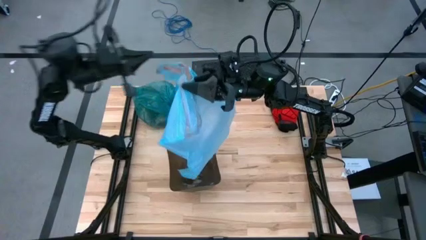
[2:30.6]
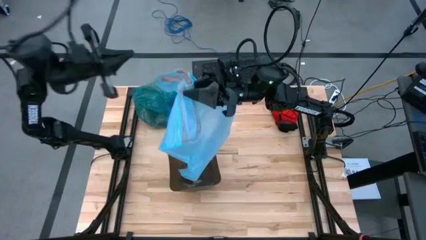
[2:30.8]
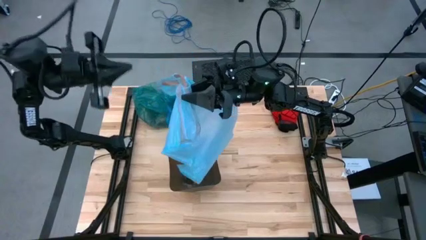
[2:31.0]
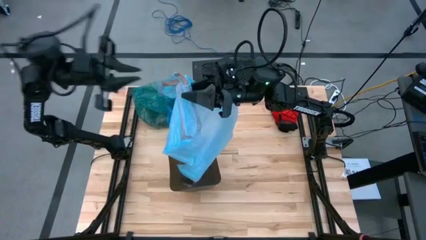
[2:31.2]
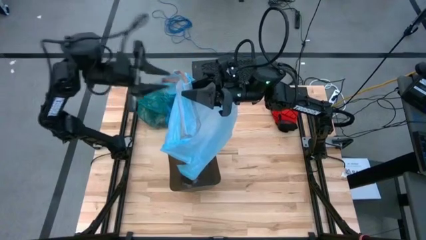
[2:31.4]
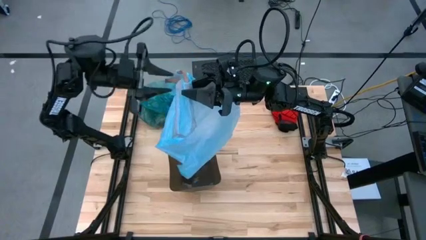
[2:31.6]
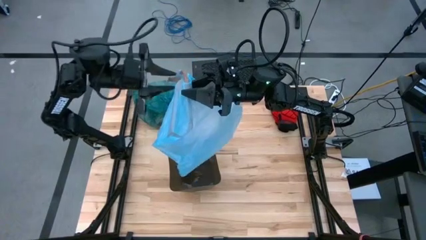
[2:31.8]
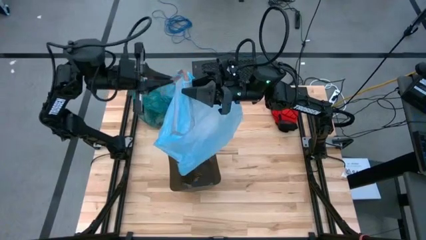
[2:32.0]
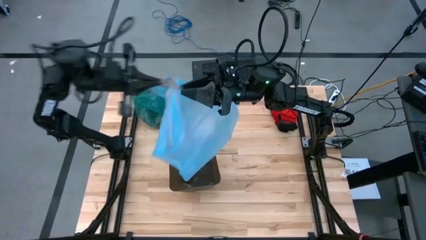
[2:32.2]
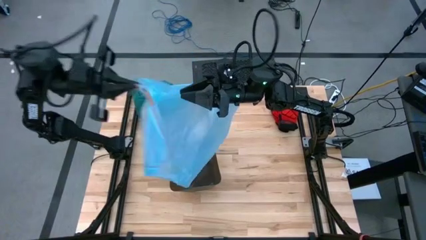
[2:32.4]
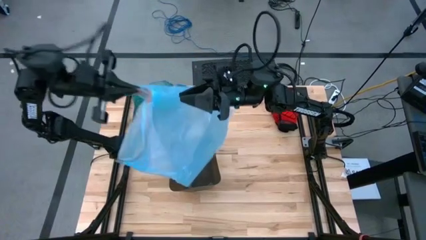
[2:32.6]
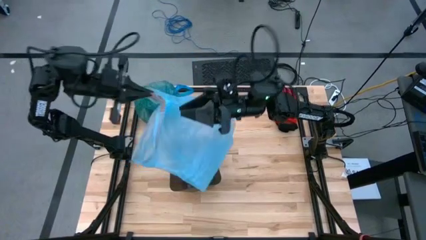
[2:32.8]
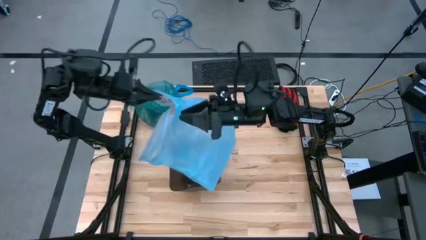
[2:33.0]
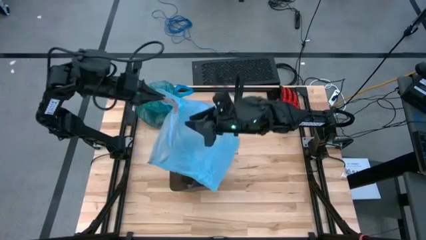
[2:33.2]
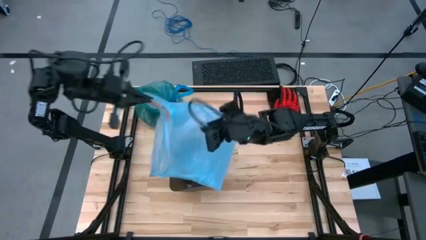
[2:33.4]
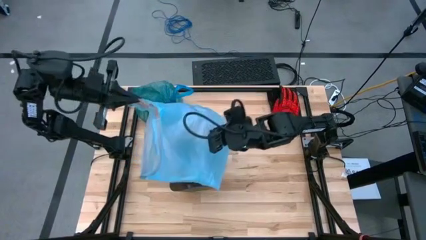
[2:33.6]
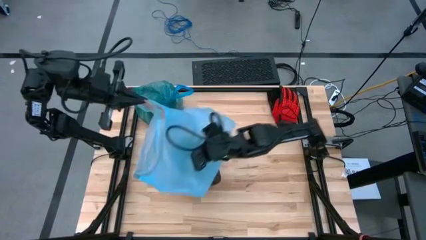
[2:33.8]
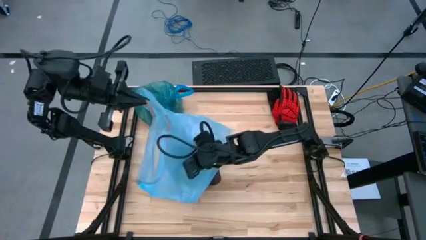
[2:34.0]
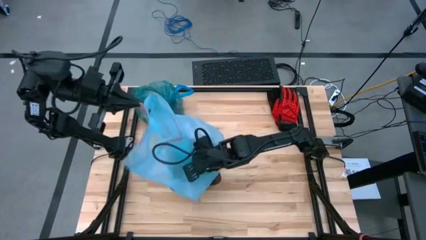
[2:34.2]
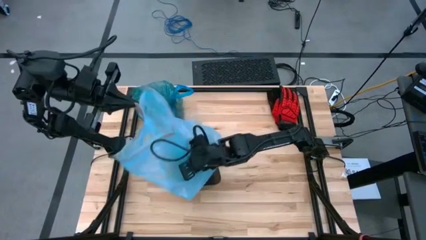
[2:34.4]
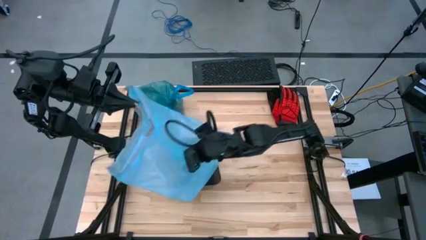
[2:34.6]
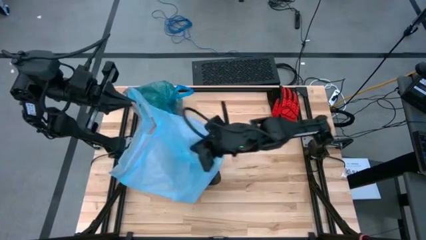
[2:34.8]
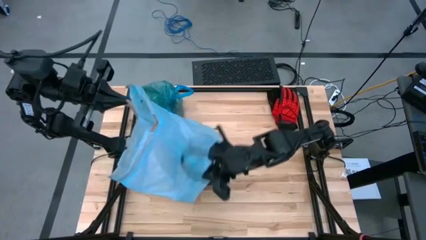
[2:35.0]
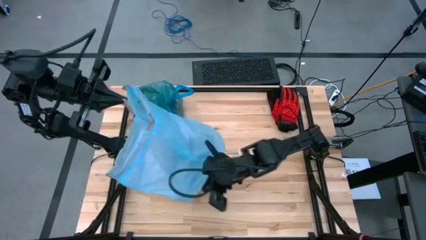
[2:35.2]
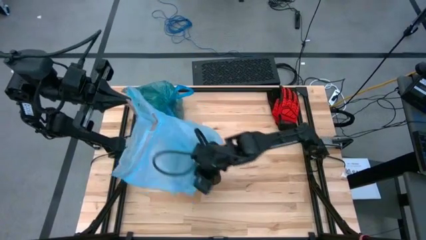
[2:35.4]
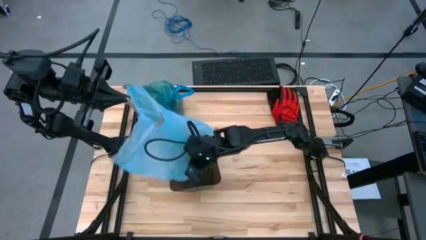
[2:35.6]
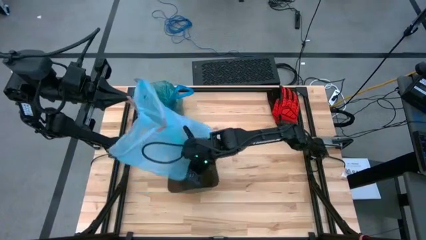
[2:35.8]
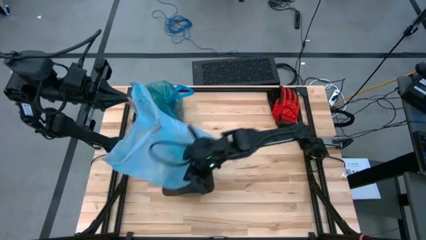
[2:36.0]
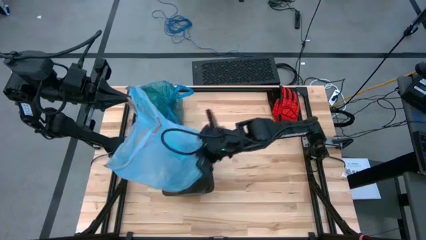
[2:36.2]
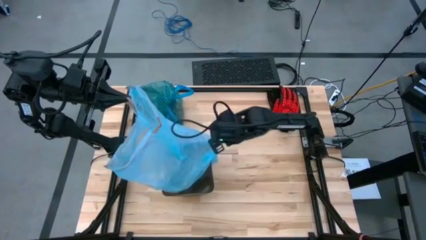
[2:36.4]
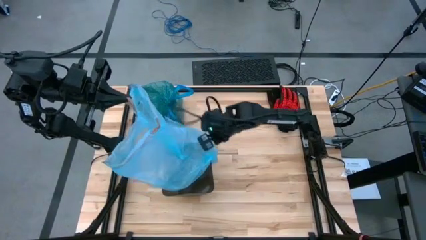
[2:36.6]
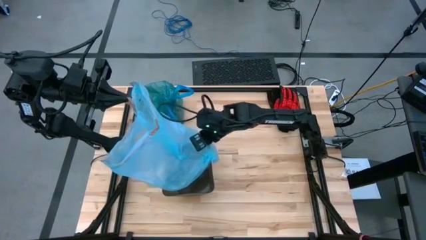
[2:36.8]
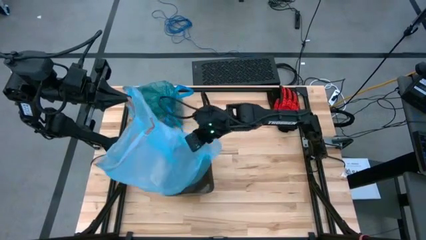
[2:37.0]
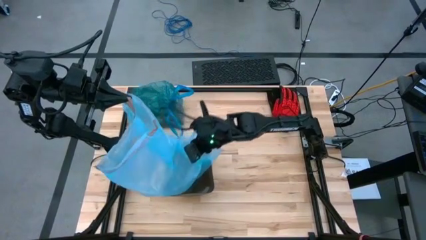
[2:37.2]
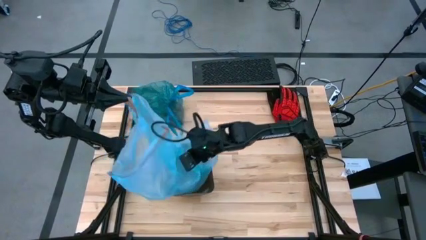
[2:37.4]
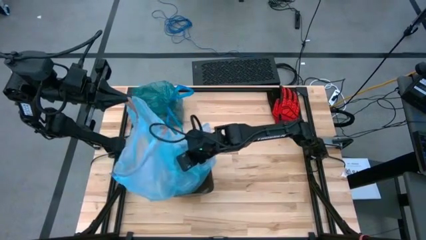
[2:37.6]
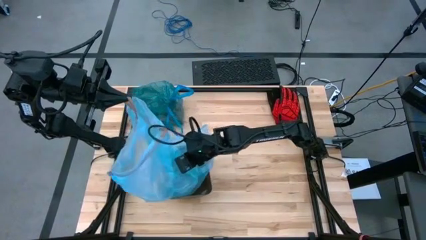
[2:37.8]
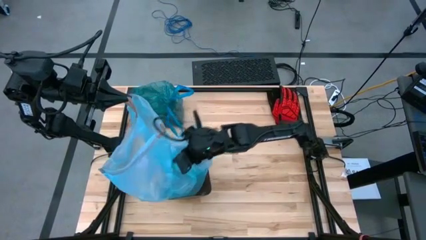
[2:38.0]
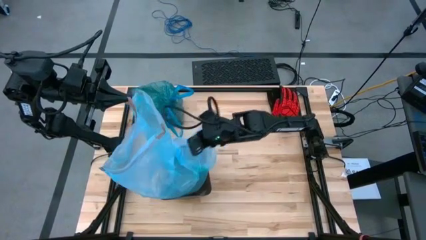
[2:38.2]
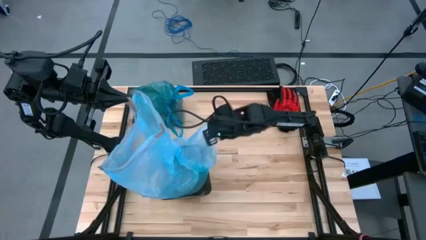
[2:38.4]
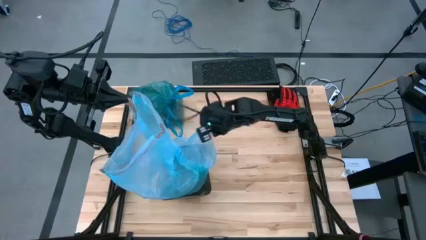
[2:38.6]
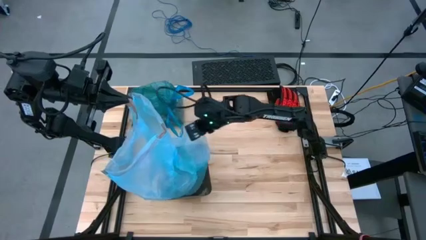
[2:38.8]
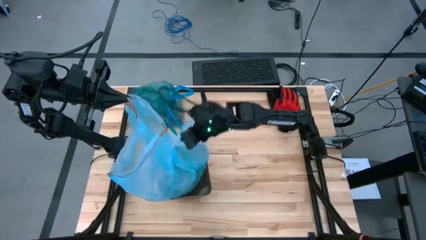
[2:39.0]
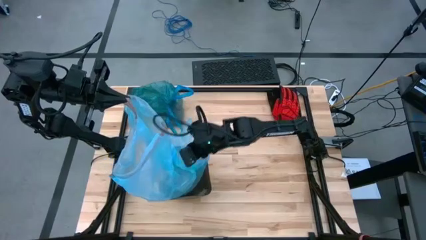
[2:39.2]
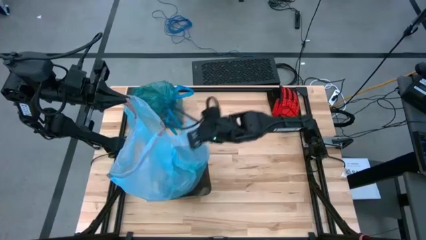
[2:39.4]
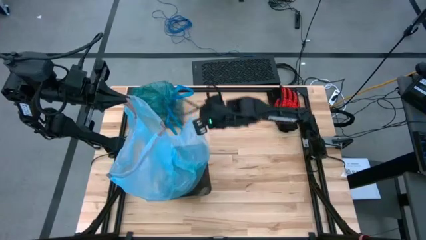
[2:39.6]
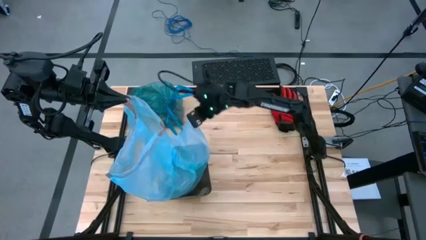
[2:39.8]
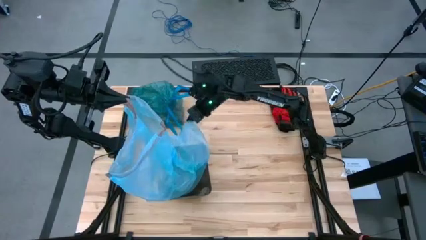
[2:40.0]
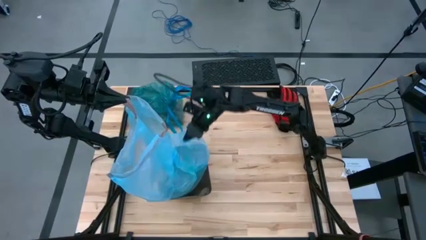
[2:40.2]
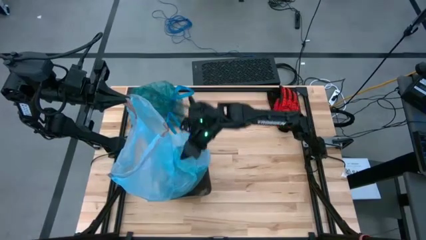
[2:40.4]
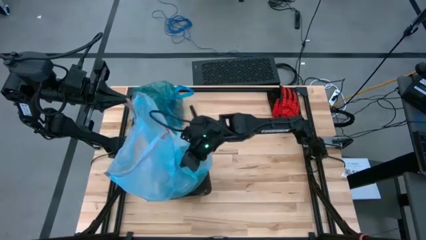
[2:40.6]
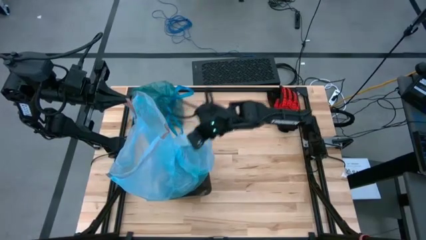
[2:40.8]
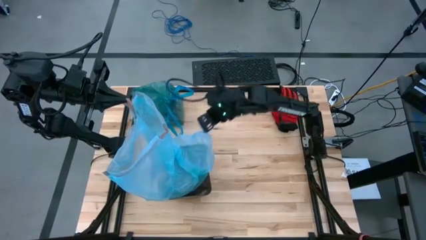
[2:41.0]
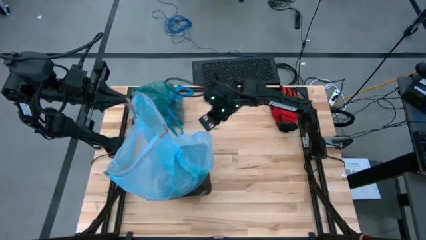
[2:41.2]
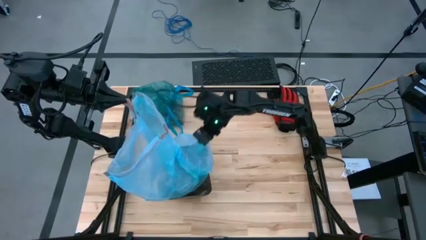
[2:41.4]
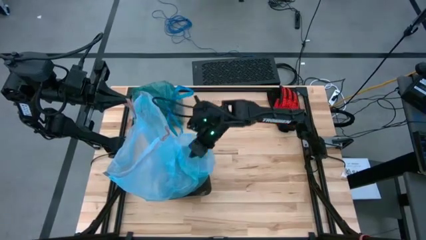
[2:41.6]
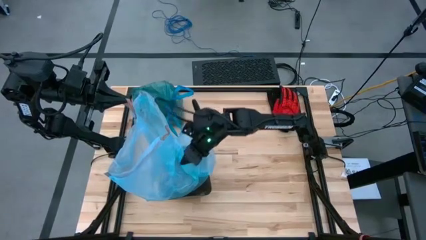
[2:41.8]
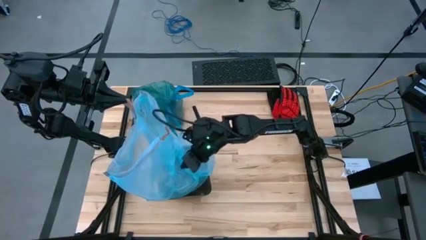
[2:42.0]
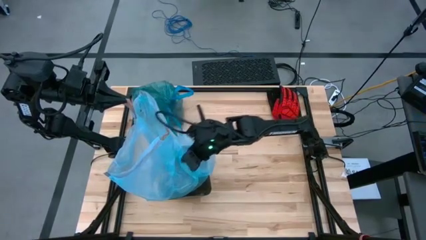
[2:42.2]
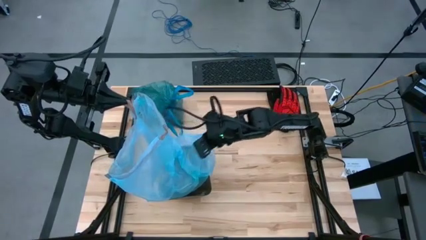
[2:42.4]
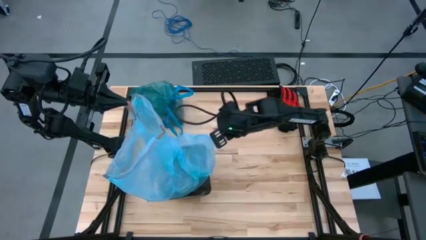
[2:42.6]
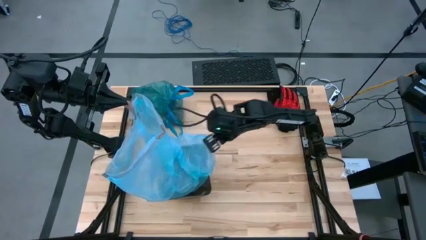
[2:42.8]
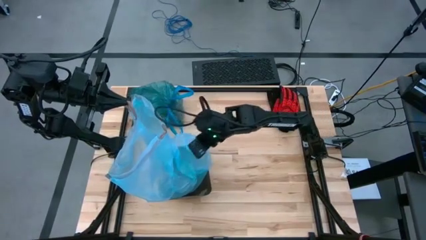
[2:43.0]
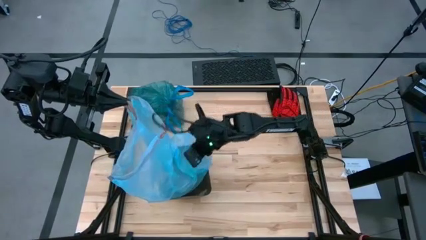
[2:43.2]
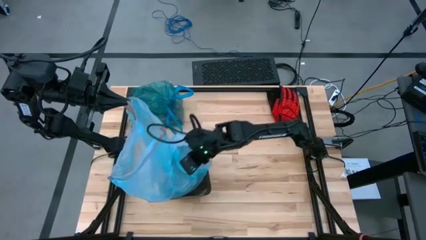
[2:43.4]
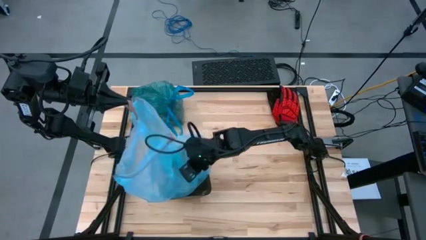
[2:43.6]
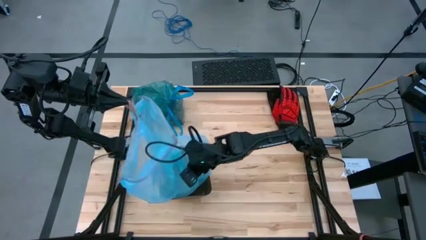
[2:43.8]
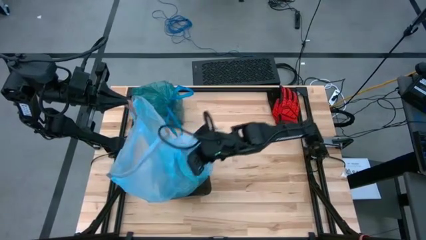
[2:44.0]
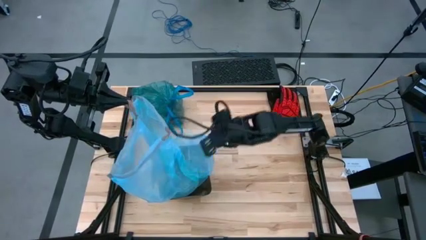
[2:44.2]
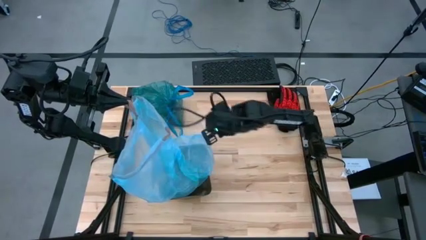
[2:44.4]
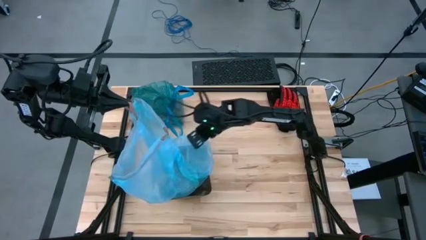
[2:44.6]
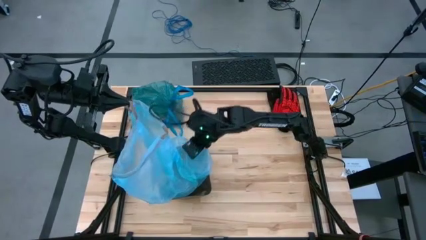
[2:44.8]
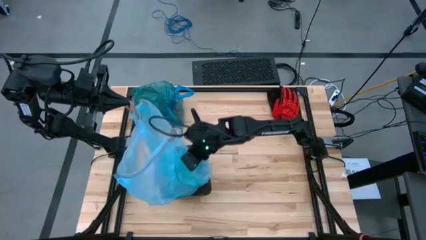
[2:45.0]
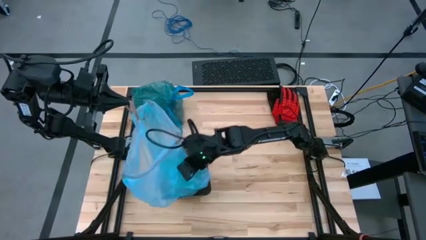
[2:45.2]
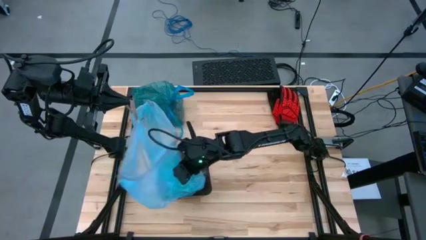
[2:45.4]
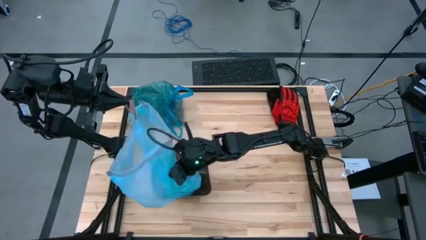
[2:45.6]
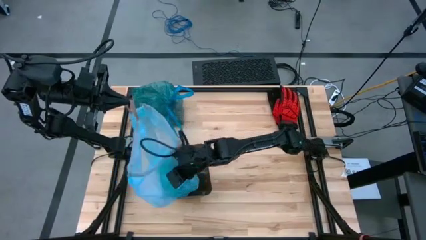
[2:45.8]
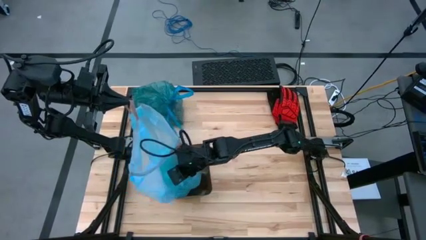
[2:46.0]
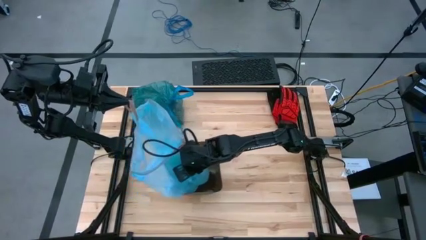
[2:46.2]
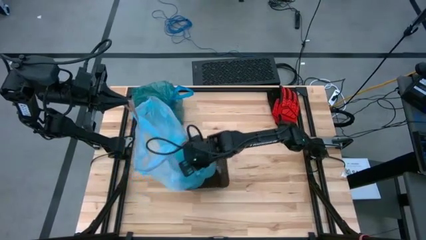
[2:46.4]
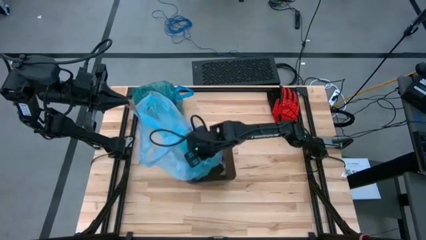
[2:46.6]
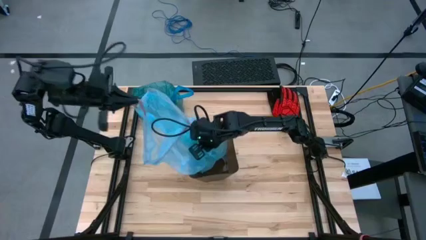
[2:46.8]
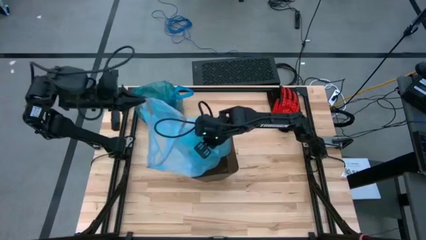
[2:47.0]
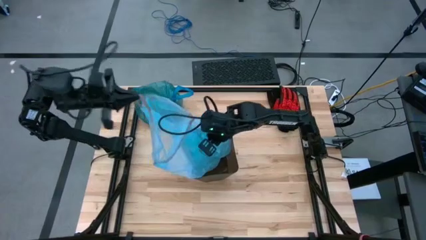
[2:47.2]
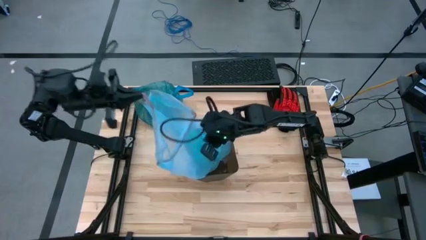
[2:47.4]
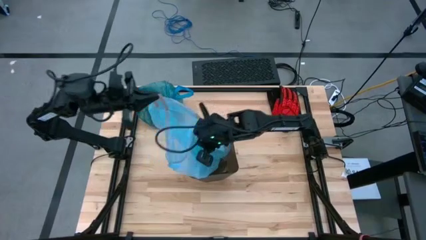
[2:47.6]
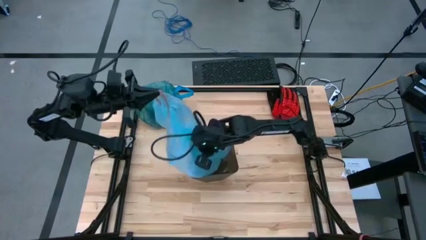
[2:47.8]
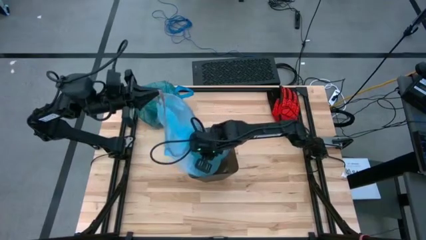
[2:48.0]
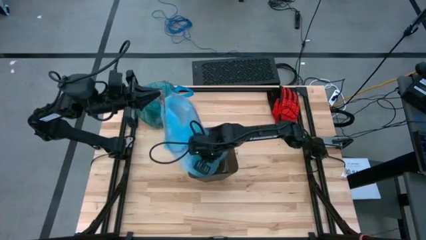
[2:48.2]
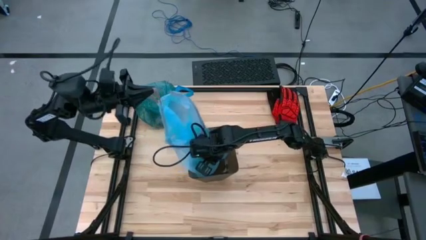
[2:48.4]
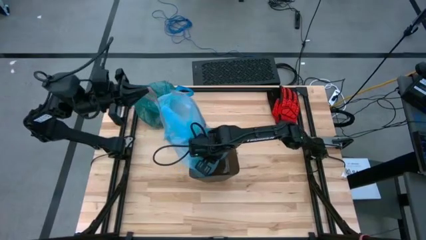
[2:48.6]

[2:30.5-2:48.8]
Task: place trash/remove bag and relplace
Insert the new blue trash bag into the trash bin
